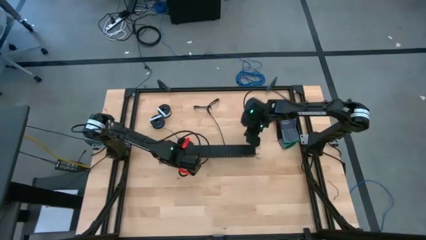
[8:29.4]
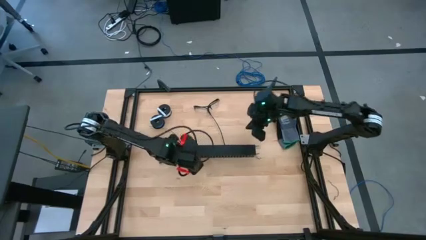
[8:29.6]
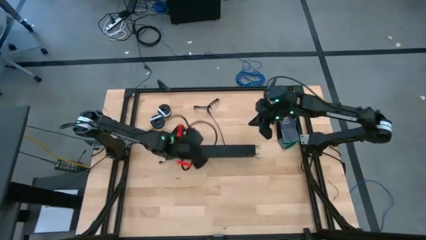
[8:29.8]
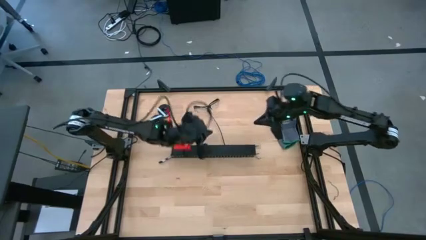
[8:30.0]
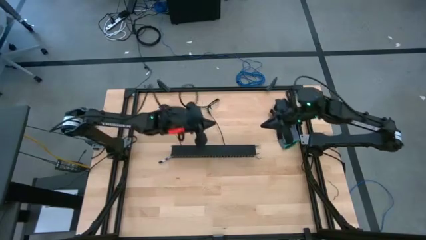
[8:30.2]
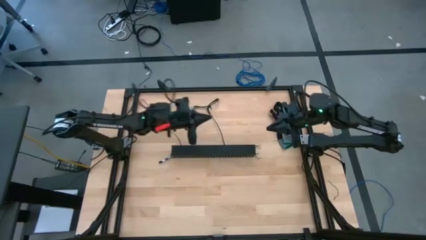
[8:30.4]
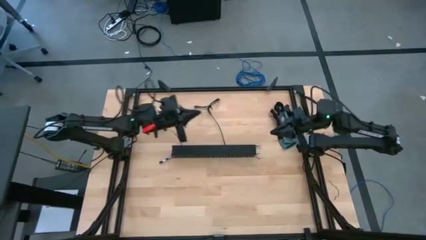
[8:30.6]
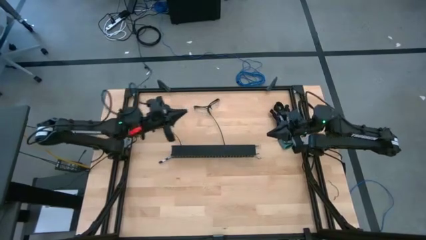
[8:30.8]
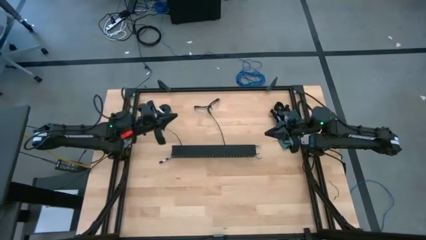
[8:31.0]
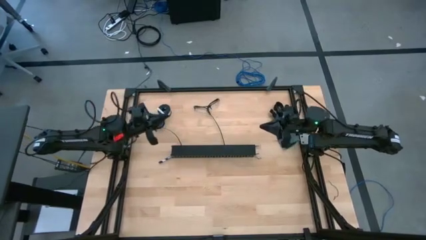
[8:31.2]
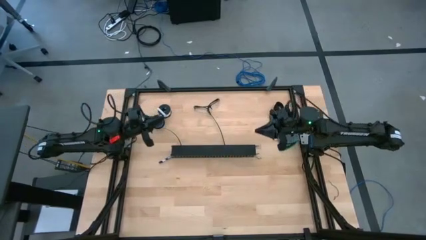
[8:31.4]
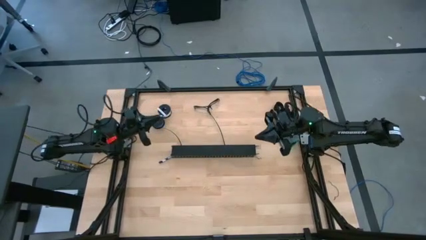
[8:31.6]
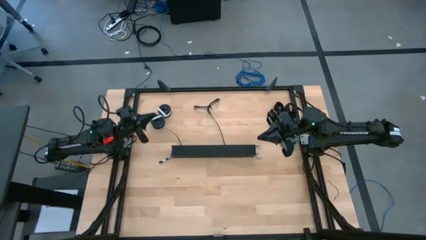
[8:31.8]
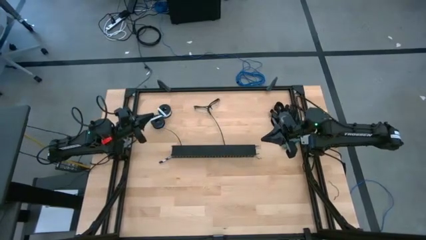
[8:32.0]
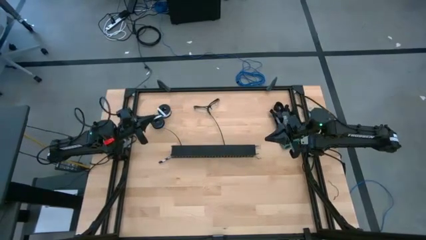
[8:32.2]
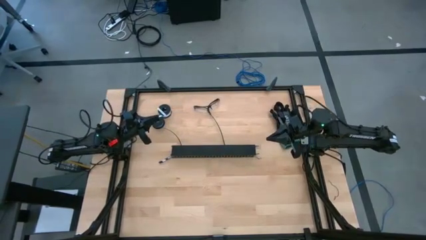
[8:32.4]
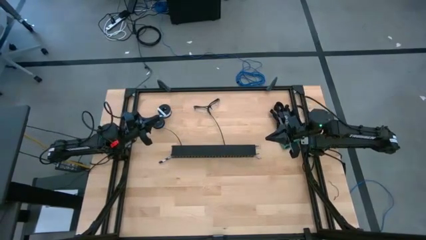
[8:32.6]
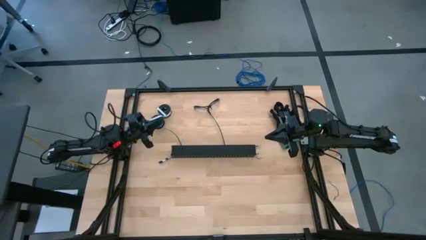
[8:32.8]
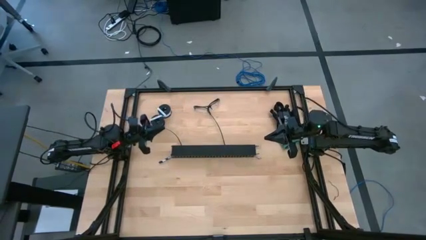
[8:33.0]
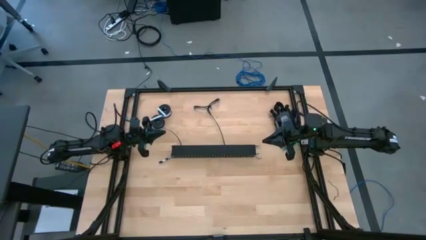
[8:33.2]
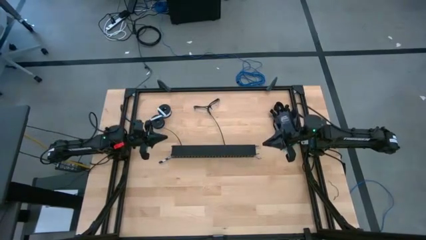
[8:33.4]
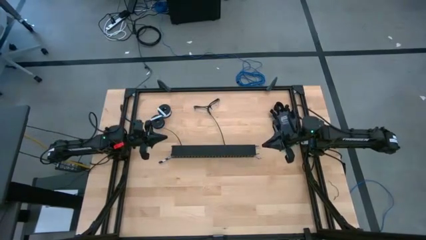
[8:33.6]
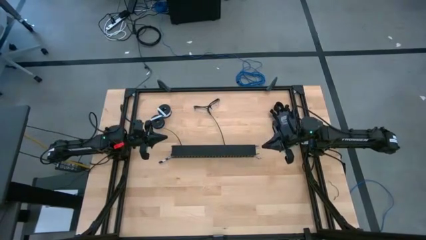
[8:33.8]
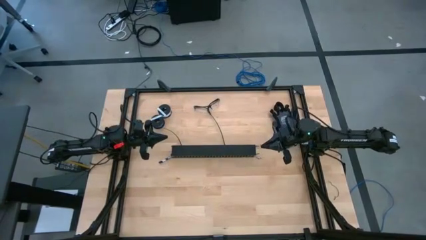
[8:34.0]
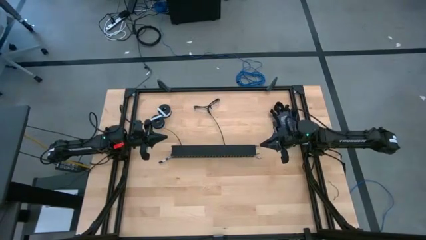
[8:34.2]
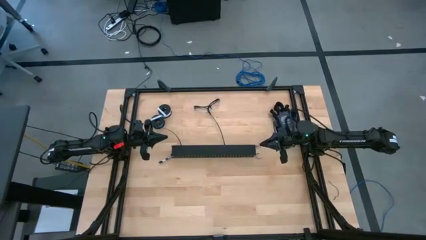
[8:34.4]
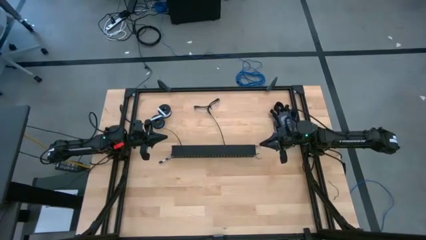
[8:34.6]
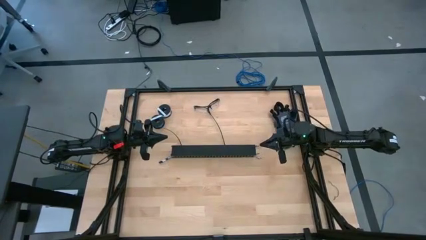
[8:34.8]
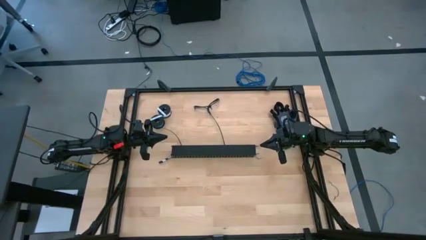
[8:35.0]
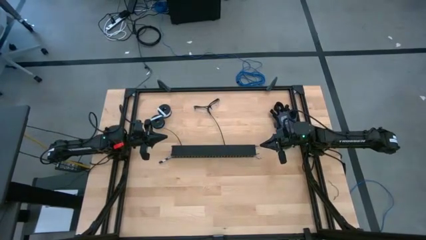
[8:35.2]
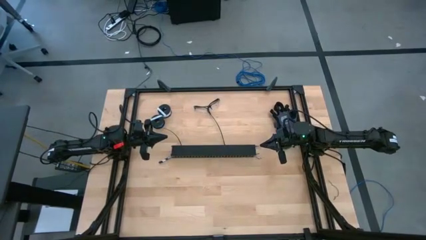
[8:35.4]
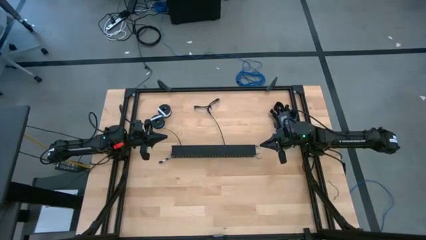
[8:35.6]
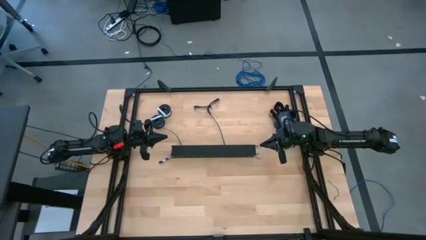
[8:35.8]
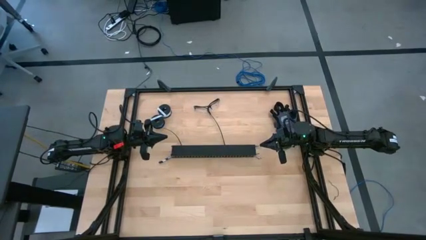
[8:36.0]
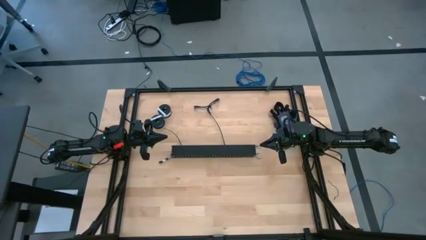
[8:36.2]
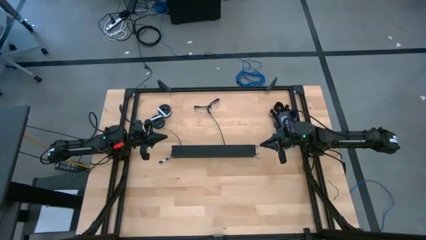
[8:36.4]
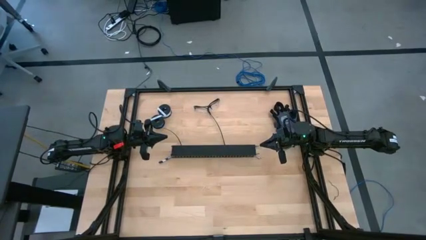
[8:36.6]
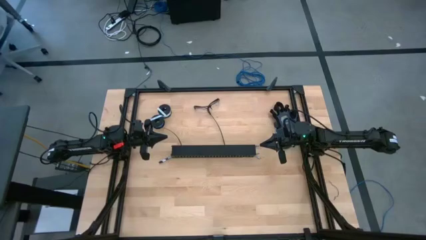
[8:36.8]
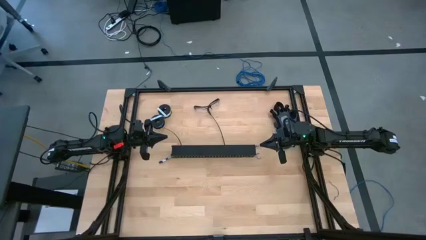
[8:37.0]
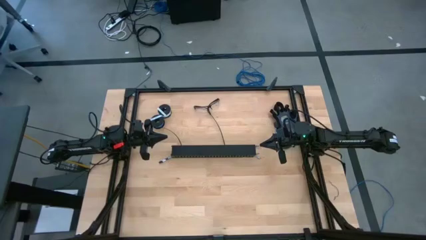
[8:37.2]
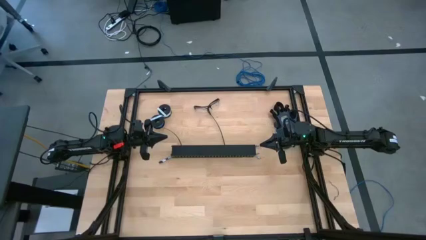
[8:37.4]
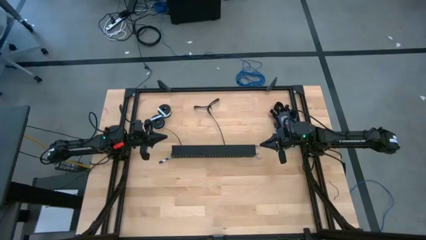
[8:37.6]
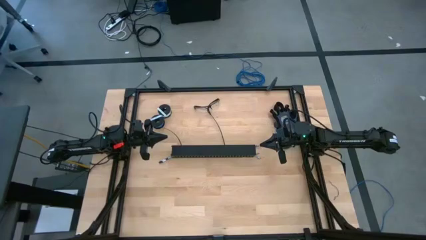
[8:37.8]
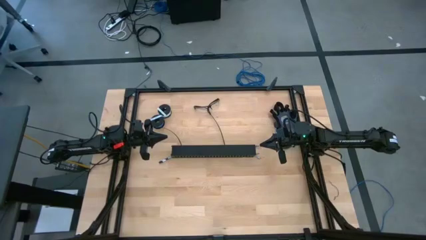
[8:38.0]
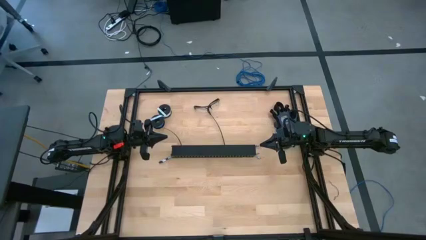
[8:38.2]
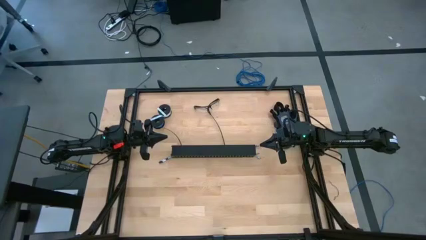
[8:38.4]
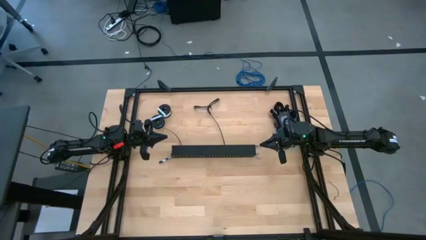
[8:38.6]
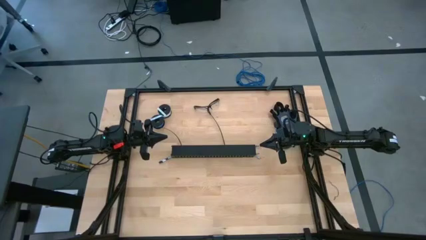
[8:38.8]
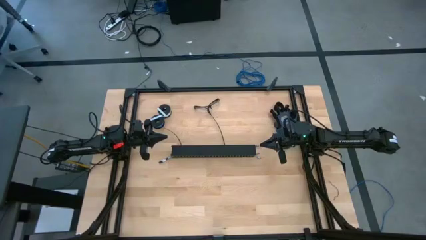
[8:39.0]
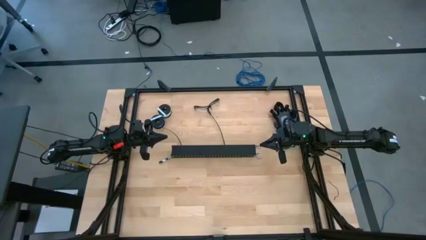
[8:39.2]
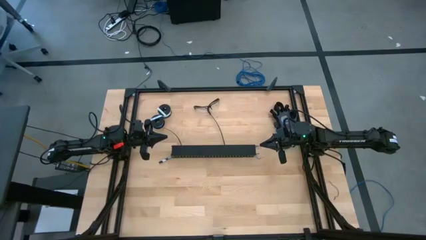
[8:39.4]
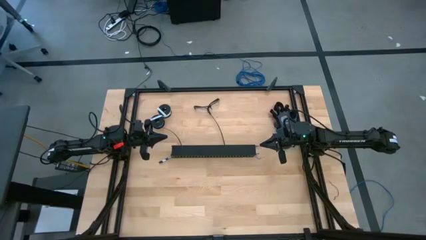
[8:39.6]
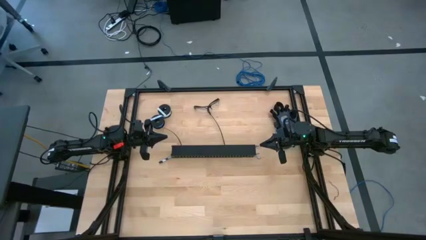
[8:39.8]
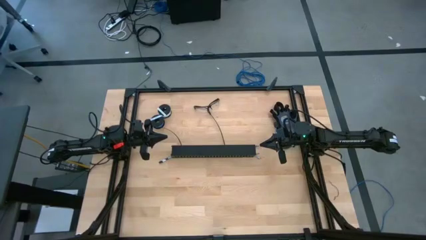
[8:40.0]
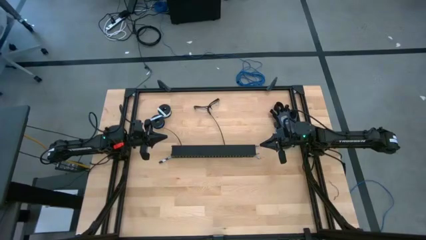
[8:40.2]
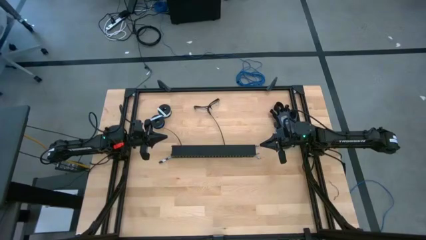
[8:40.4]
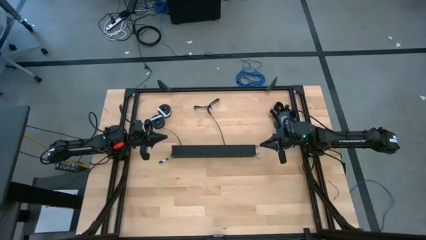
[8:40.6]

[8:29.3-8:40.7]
Task: Ziptie cables
Return to Home Position

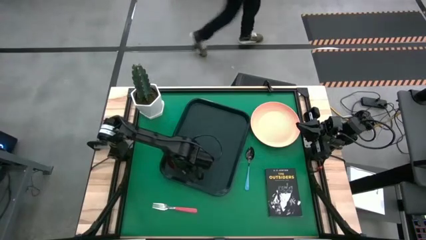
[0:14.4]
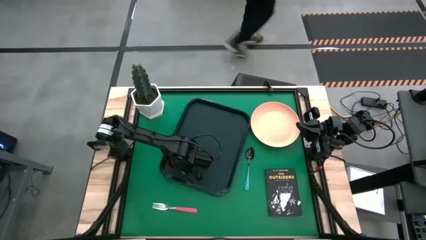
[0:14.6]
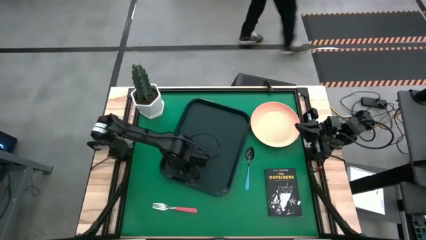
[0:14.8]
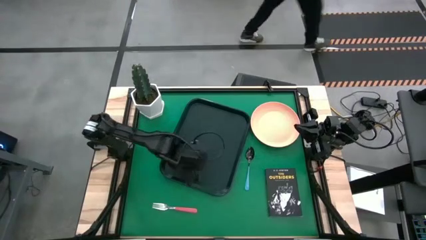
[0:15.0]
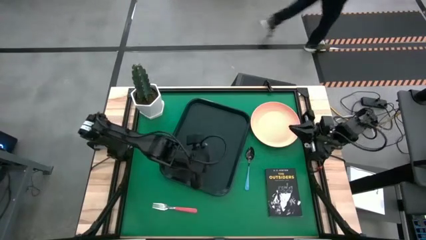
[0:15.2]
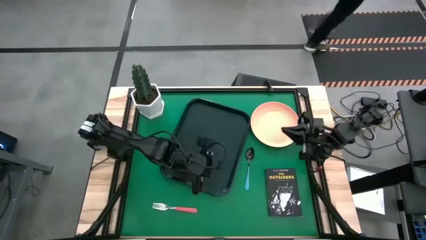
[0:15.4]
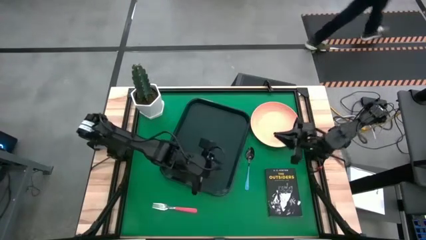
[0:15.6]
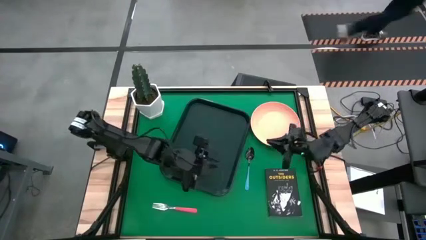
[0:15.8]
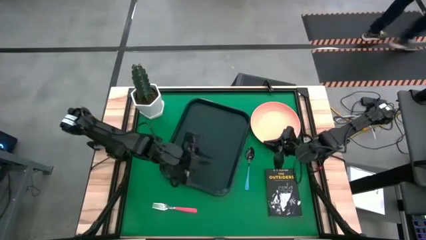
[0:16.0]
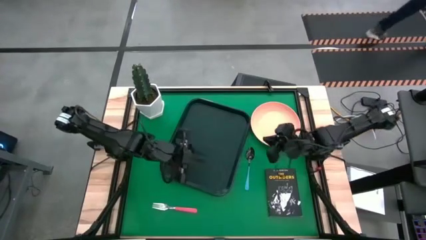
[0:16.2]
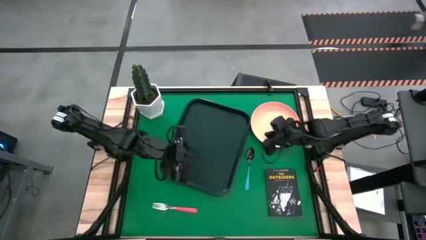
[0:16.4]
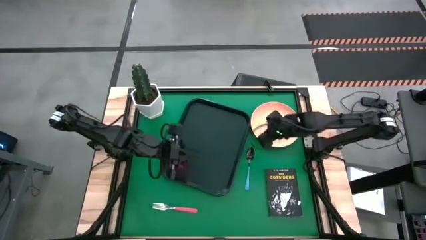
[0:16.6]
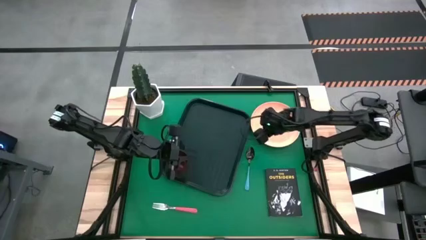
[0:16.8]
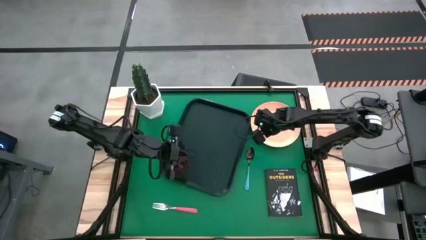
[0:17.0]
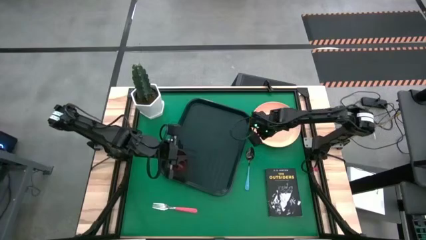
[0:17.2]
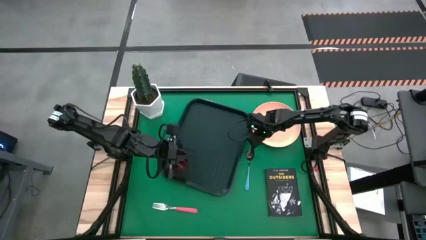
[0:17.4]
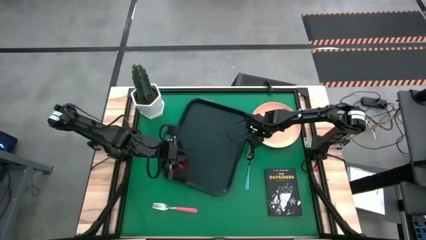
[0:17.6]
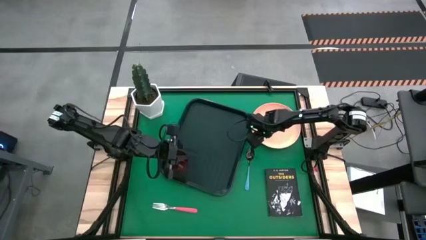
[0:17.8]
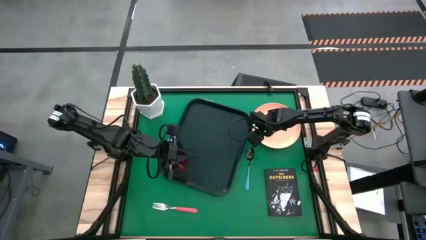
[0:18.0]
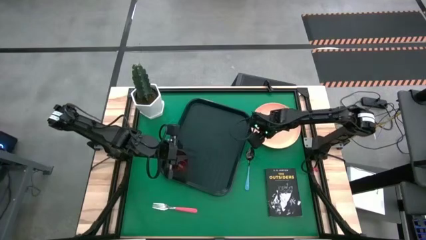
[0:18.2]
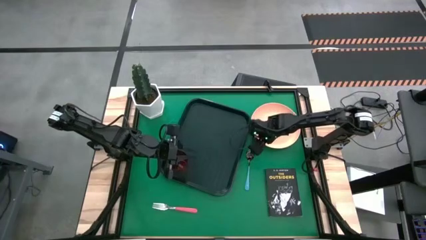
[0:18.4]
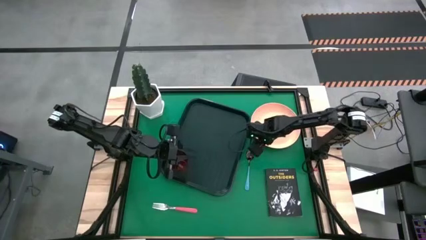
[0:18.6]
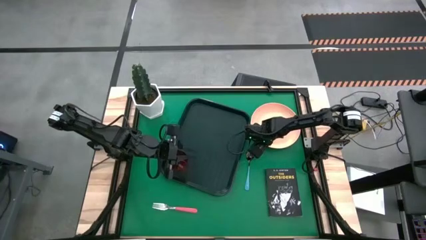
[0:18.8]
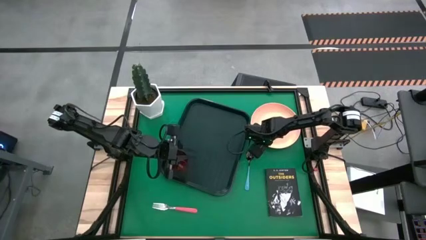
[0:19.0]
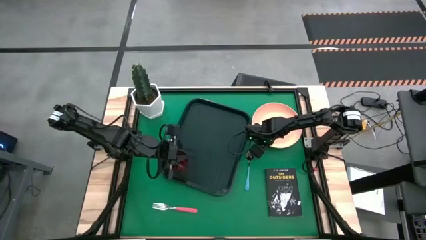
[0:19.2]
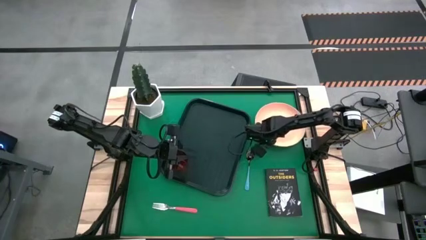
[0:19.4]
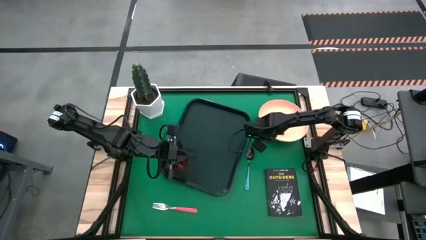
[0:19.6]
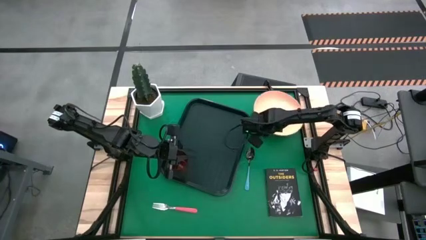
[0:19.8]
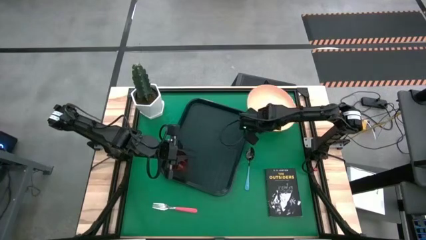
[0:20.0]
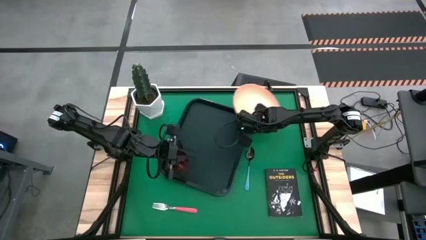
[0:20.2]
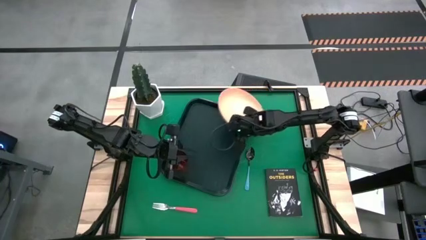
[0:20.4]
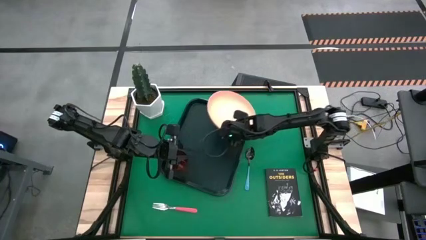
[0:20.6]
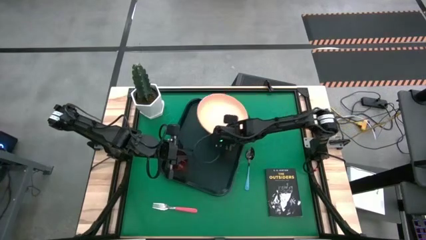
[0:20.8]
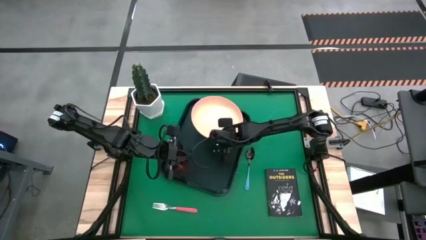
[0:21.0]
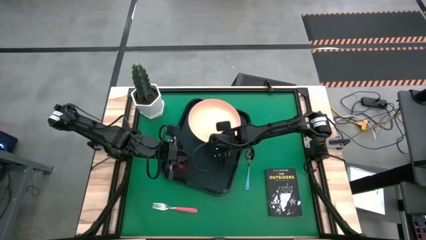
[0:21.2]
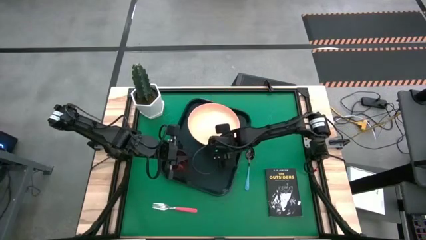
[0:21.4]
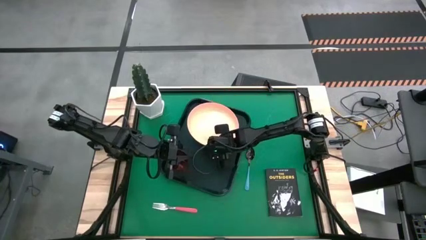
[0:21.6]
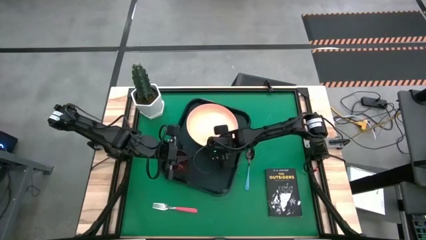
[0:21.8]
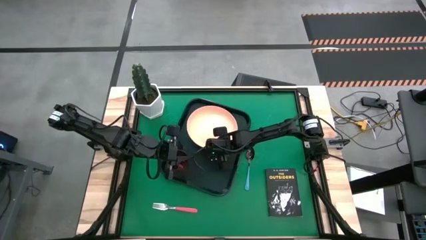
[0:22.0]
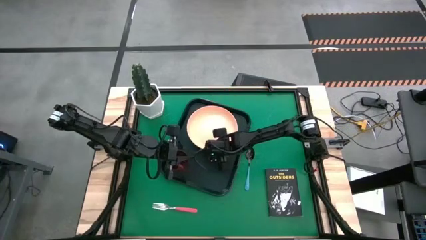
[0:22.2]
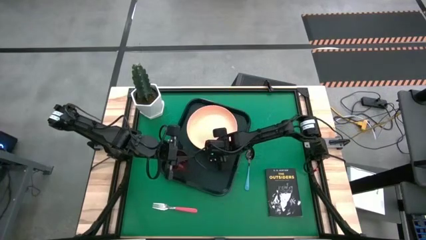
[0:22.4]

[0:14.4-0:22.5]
Task: Pick and place plate/cup/fork/spoon on tray
Put the orange plate to the right of the serving tray
